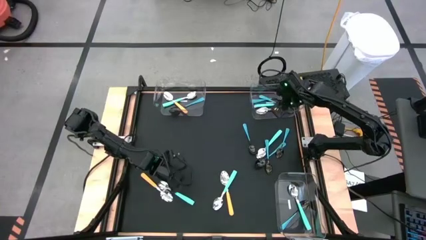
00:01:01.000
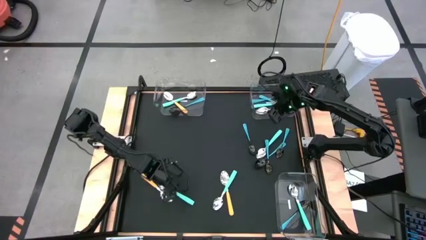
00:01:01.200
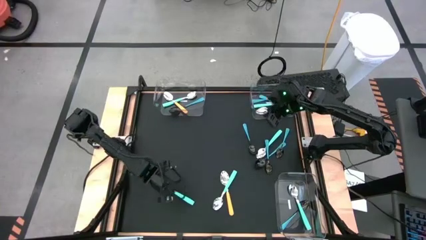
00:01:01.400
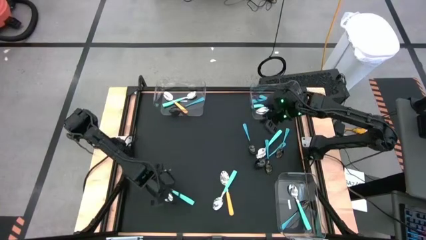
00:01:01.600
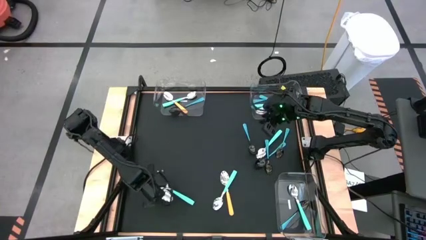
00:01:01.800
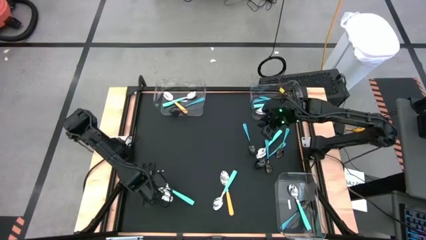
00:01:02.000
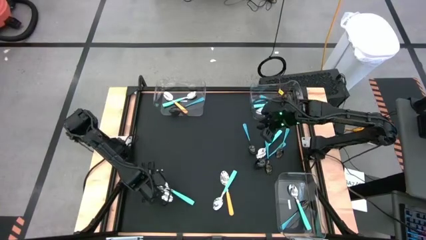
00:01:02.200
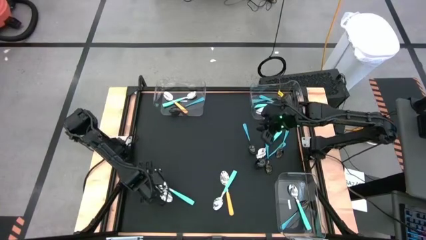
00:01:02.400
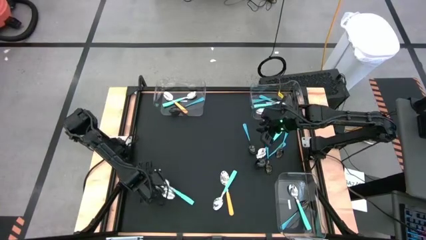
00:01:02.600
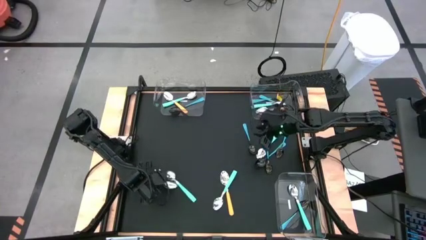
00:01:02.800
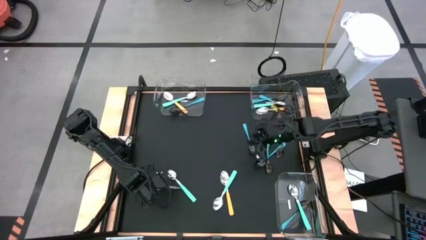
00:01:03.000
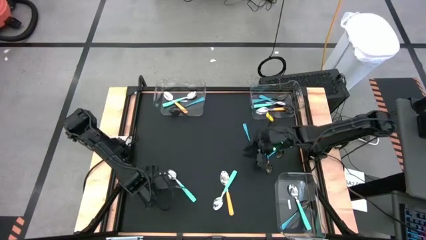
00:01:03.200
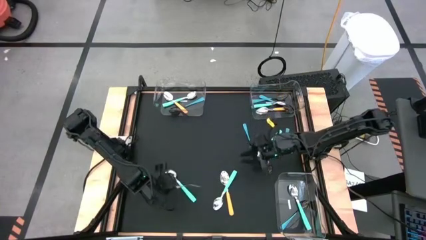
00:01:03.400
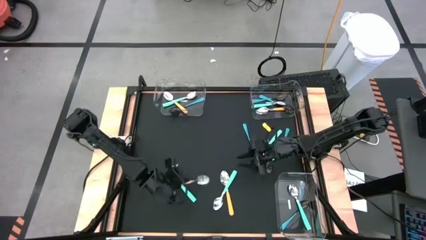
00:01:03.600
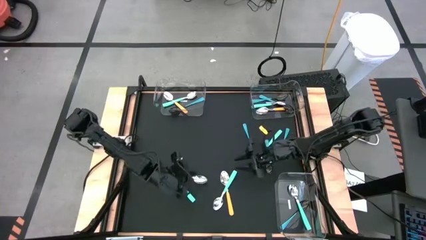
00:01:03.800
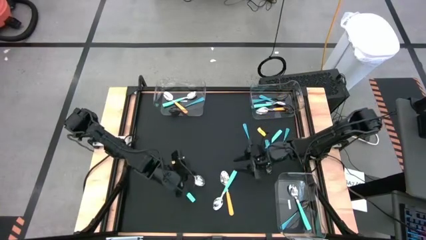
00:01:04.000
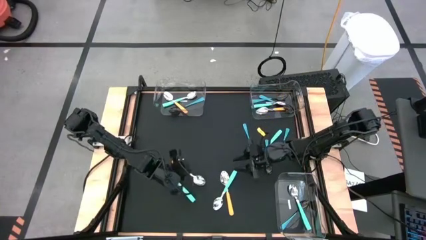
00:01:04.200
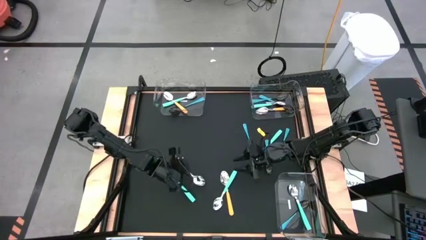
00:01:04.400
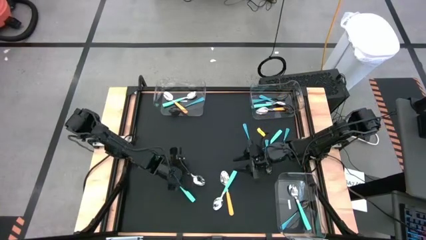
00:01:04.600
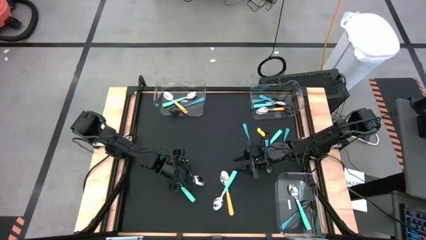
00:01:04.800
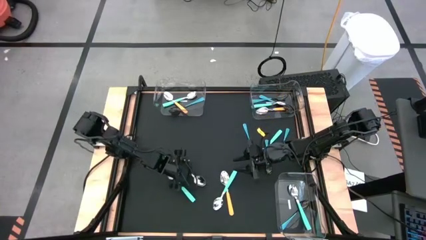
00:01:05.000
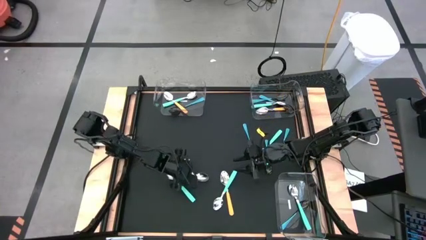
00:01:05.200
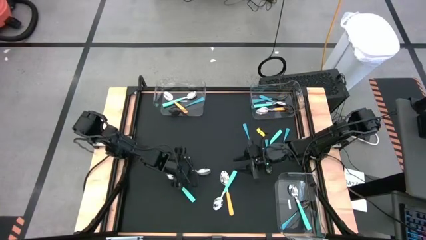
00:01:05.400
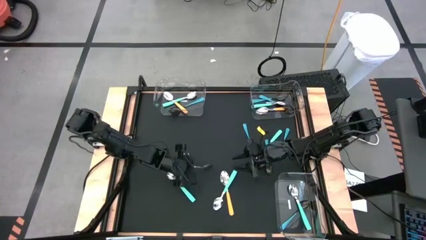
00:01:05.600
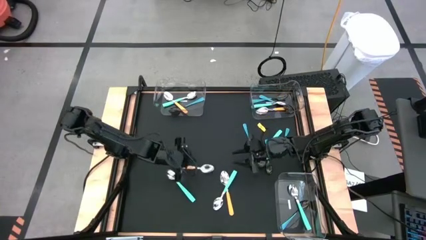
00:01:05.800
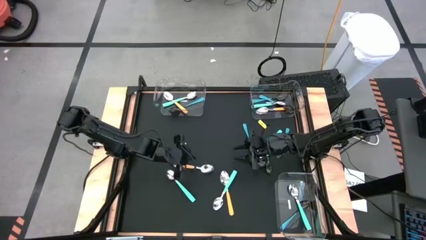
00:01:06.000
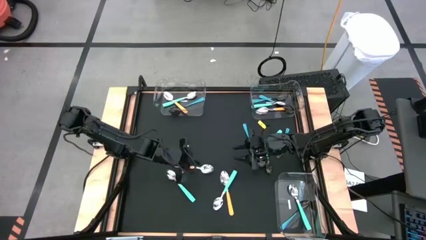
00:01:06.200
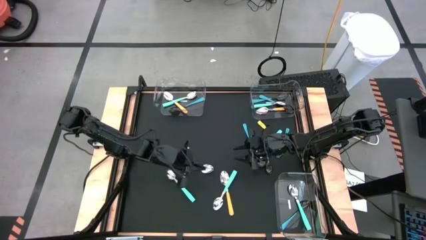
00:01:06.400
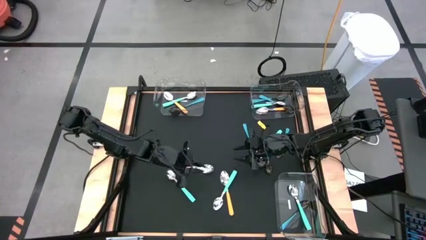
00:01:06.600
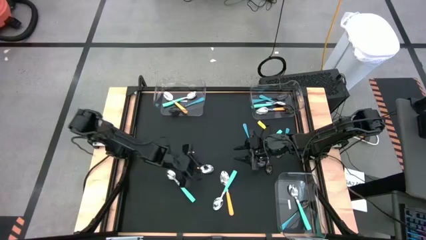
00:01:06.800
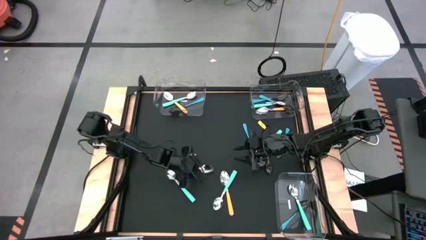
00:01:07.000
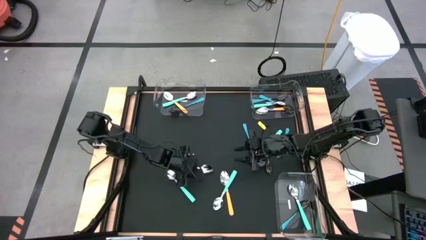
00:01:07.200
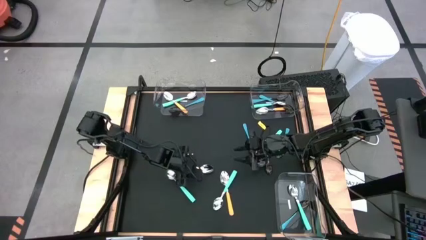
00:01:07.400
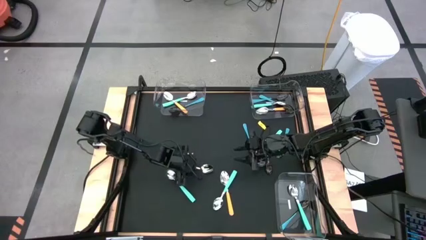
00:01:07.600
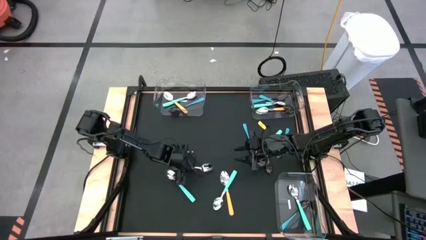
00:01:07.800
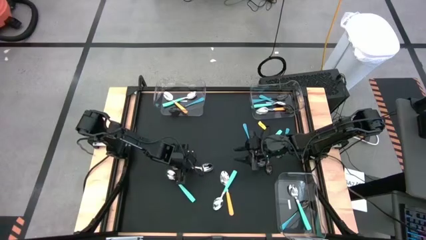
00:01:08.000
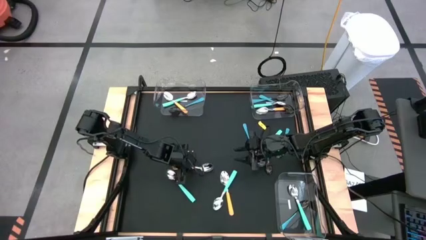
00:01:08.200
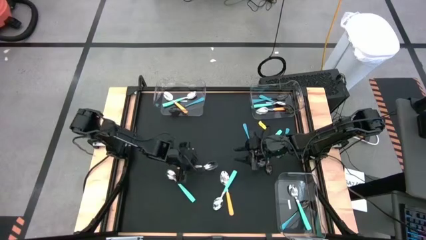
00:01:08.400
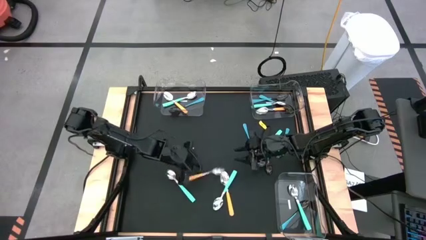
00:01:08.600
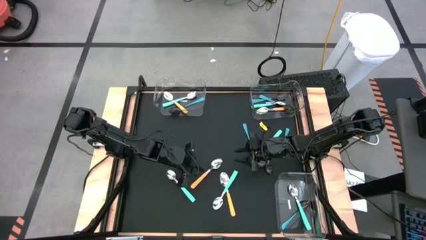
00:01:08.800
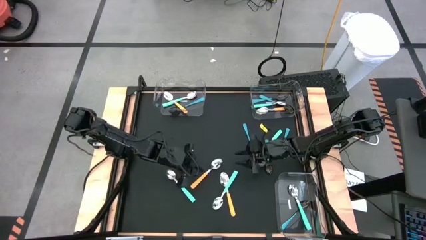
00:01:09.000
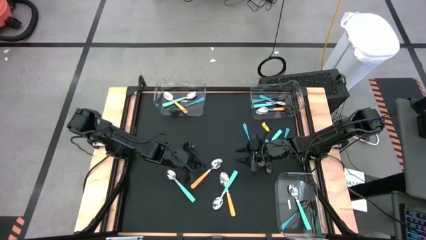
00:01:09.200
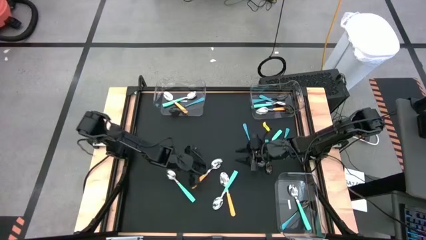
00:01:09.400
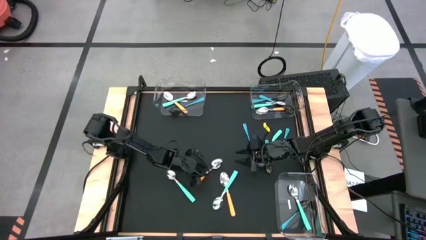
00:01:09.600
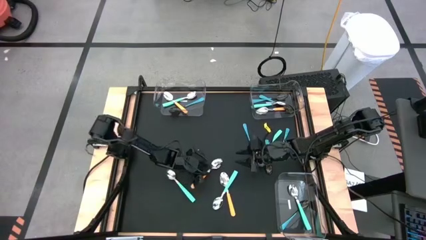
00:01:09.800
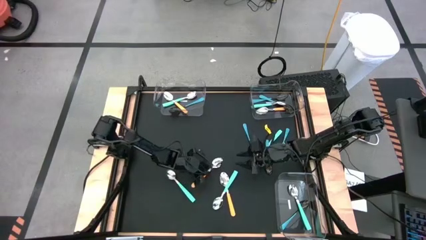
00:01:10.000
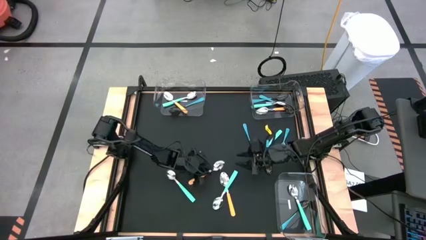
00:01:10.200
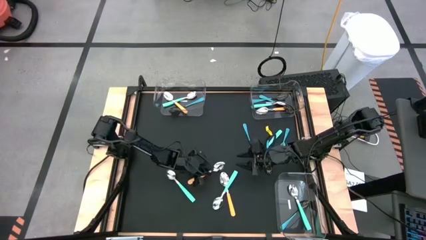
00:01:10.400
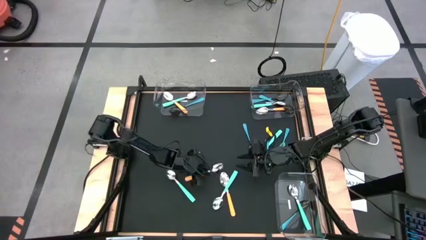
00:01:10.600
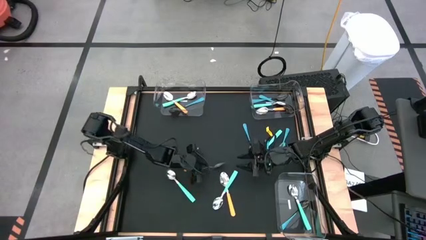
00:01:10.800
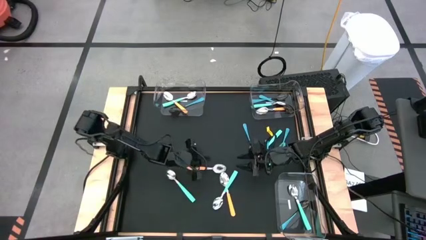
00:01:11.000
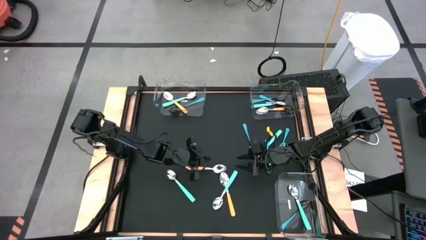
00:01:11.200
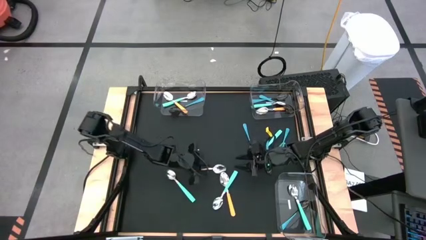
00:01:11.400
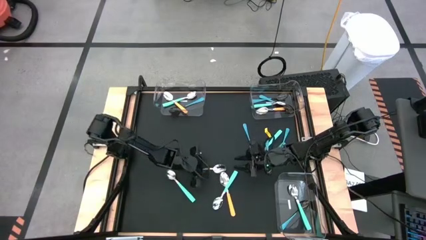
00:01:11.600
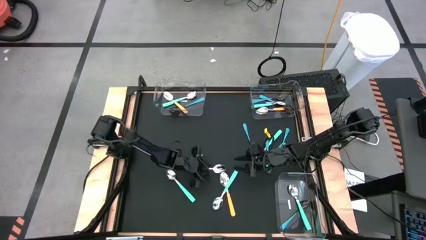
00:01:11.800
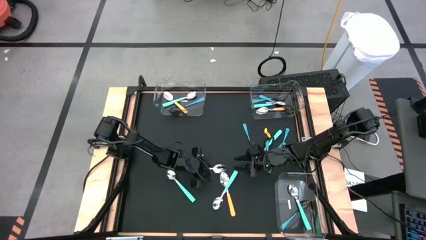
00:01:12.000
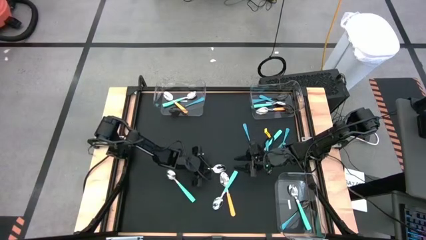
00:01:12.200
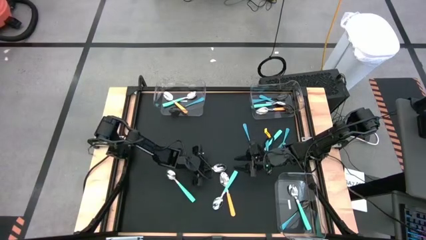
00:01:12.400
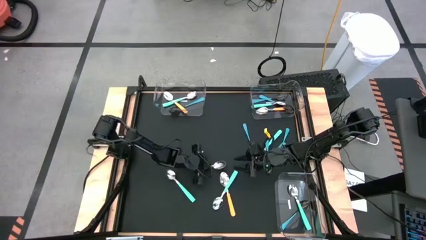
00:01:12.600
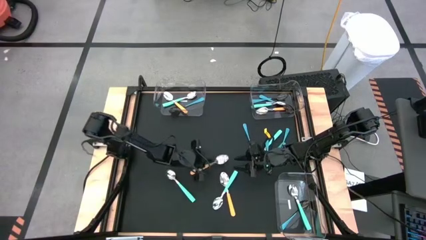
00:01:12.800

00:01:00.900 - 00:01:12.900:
Task: Sort silverware by color (type)
Put the yellow spoon into the bottom transparent bin

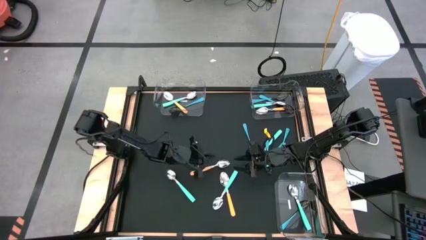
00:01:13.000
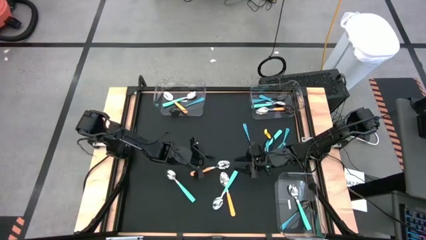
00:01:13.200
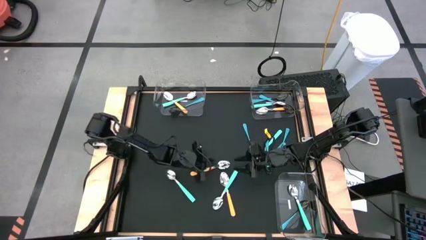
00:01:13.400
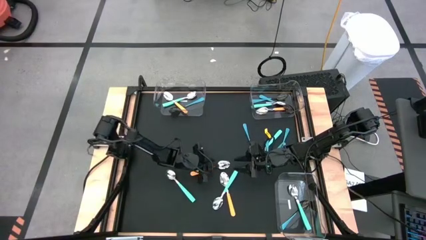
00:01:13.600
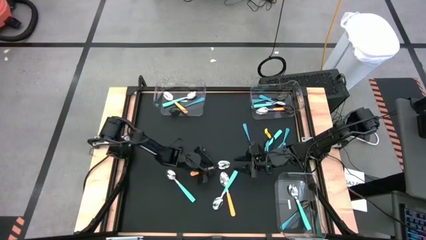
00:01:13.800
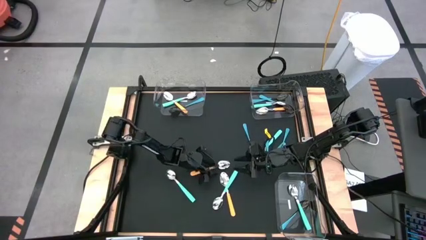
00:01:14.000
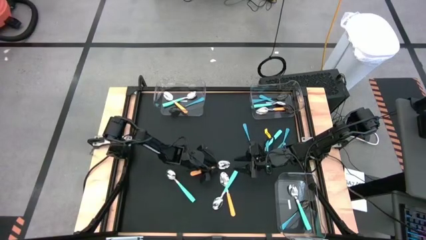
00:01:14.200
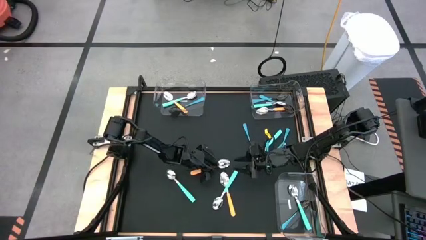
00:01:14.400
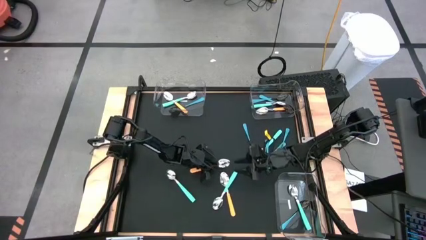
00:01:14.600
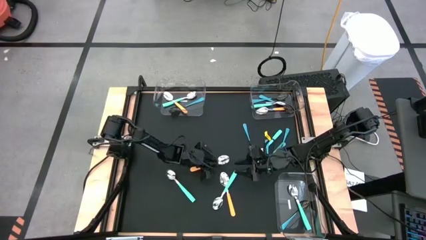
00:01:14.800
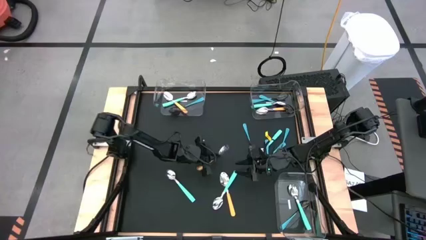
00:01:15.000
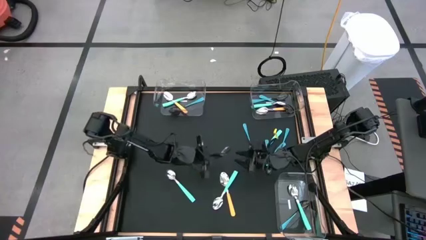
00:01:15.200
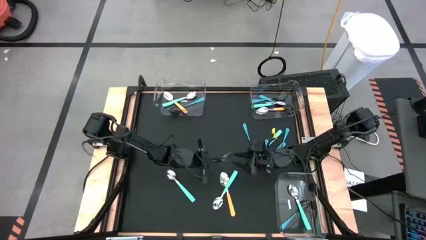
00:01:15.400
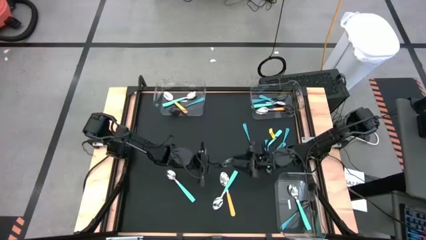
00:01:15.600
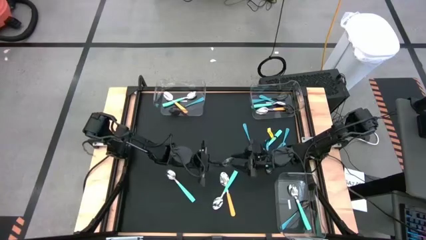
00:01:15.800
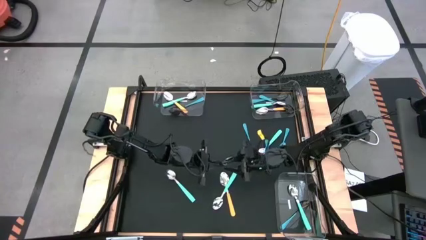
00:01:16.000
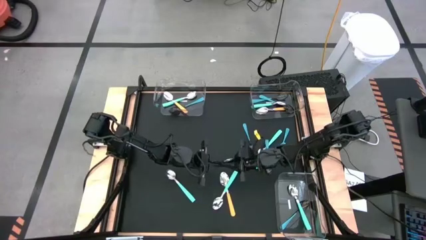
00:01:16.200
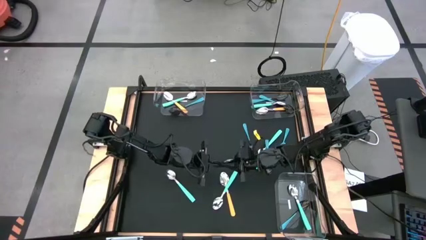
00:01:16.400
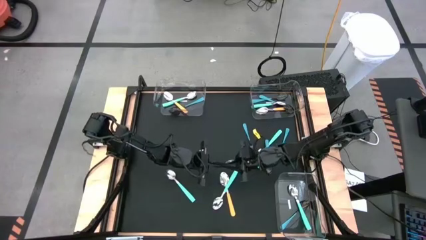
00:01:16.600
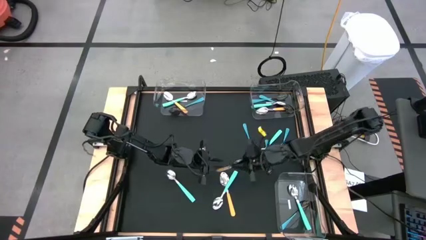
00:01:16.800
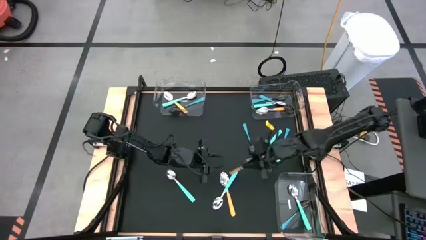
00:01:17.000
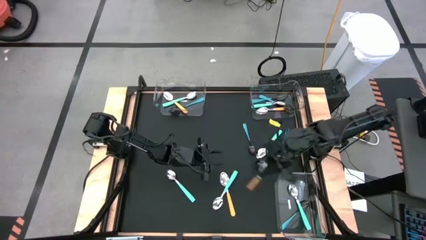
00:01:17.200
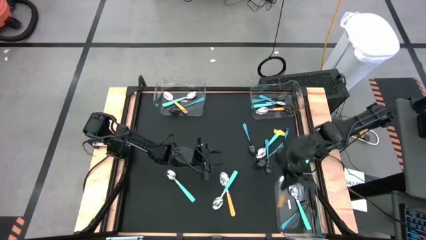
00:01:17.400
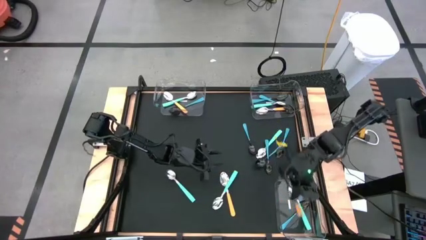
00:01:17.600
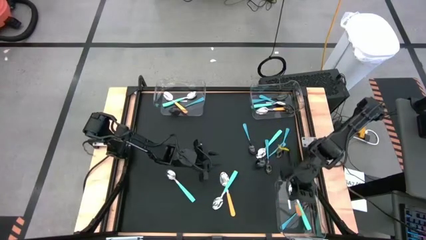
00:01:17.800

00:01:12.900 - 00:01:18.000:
Put the yellow spoon into the bottom transparent bin
